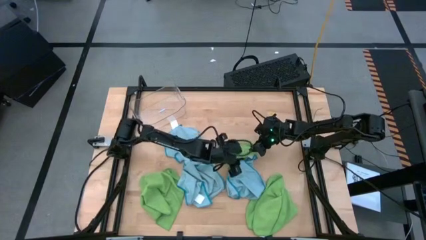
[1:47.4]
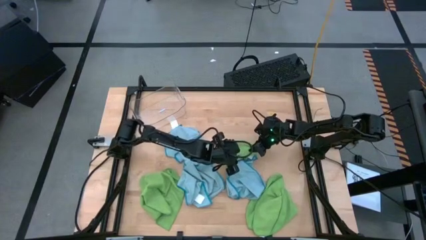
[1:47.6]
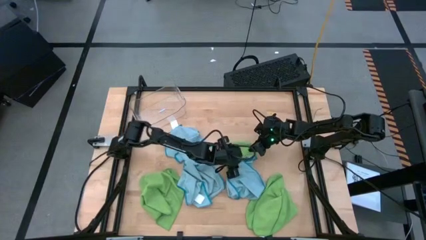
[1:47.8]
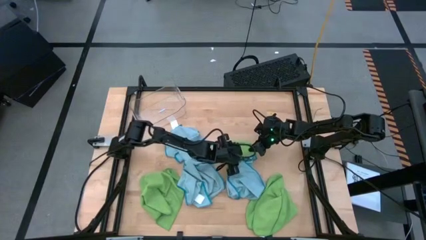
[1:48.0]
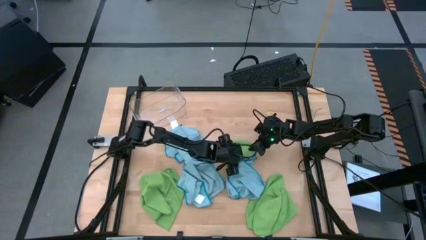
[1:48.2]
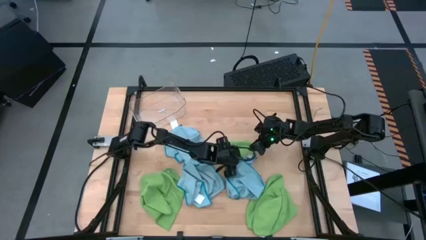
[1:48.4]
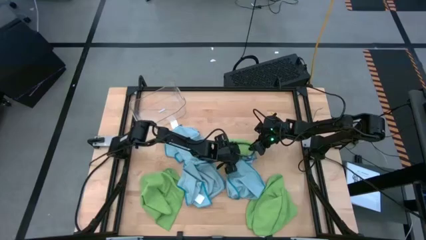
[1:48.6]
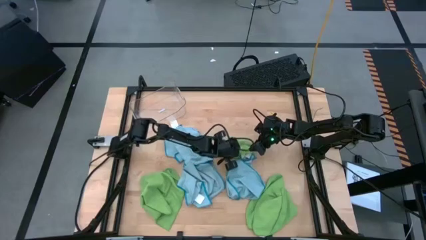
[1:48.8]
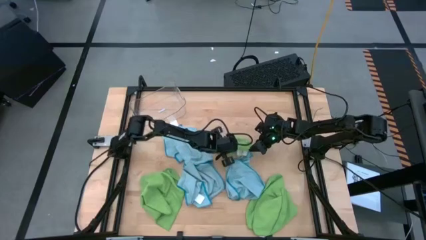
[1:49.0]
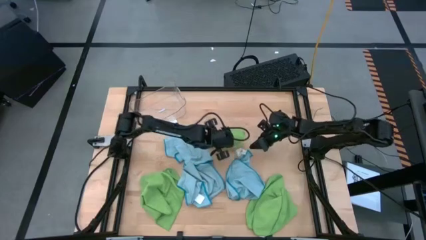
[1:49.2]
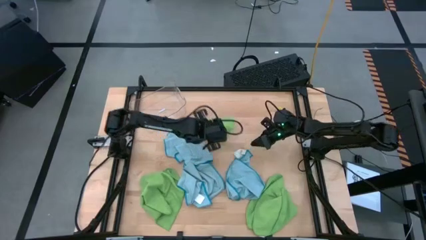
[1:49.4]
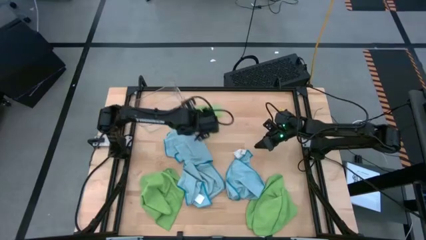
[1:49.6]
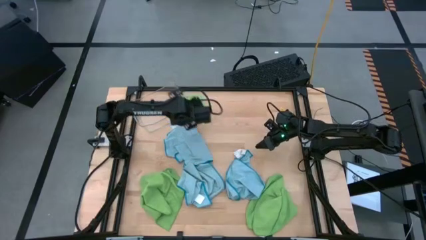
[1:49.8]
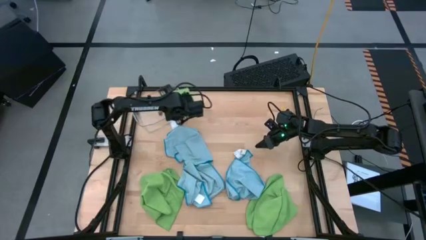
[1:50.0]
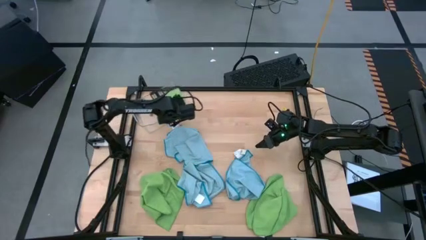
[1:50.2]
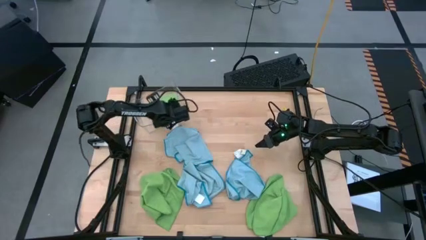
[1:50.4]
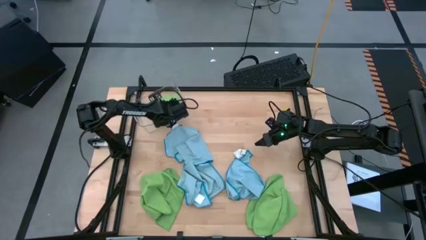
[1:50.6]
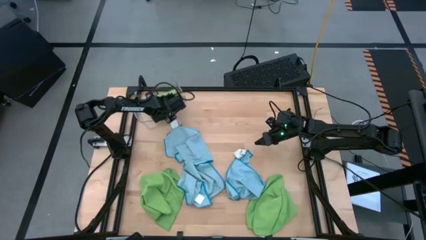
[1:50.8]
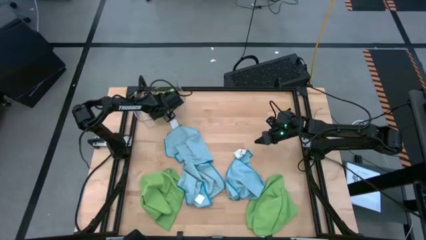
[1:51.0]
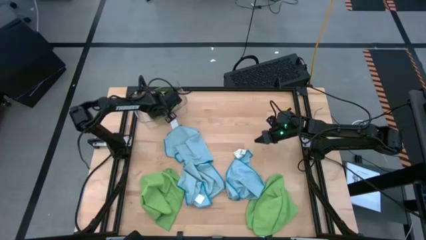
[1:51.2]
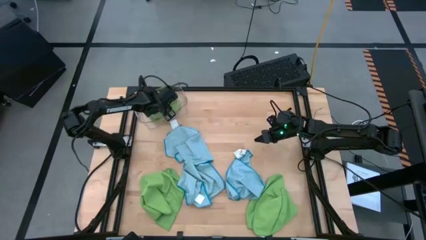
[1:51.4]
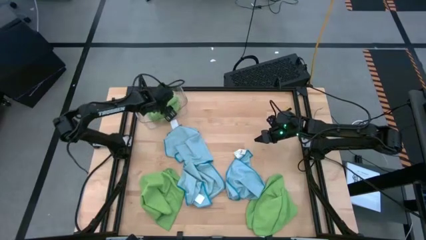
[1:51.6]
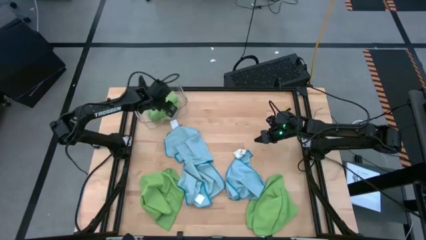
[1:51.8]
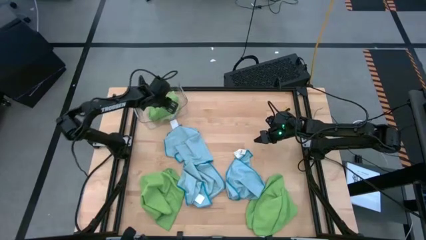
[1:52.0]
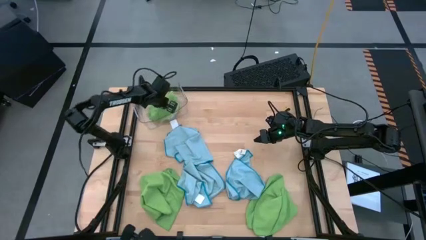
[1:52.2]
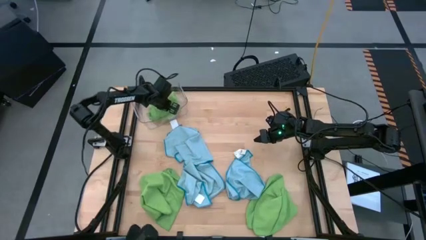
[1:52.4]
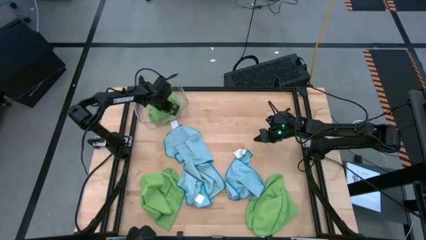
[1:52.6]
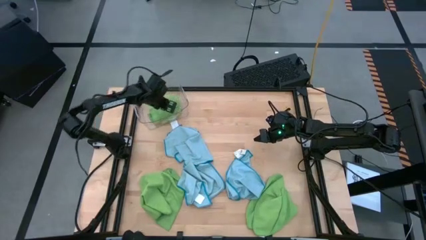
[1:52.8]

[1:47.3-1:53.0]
Task: Fold microfiber towels
Put the folded green microfiber cloth into the transparent bin

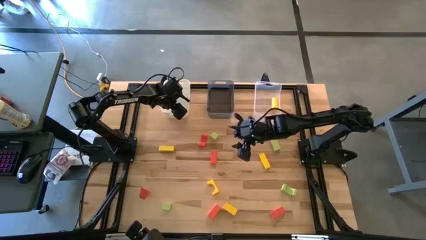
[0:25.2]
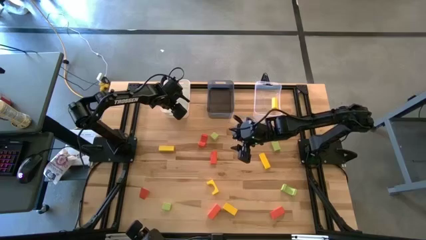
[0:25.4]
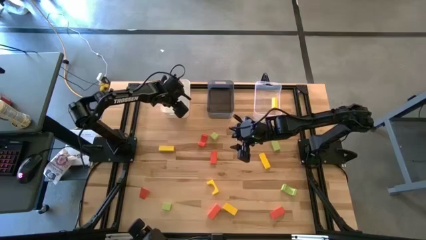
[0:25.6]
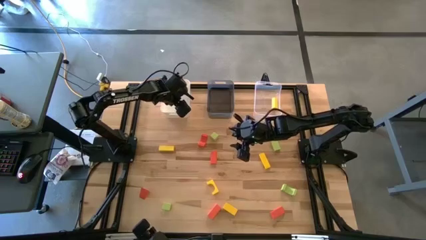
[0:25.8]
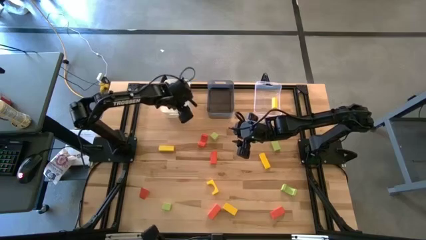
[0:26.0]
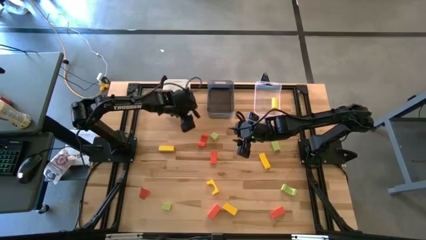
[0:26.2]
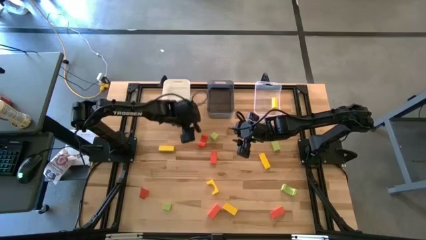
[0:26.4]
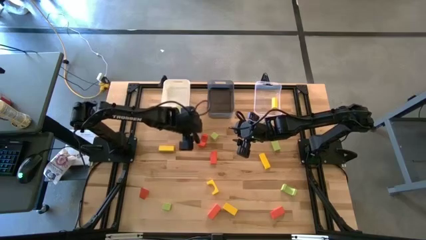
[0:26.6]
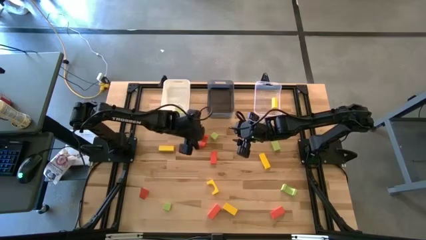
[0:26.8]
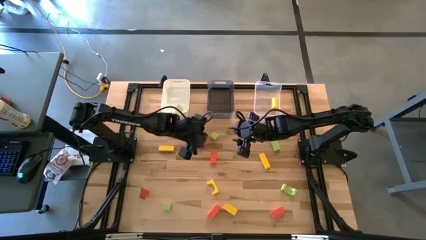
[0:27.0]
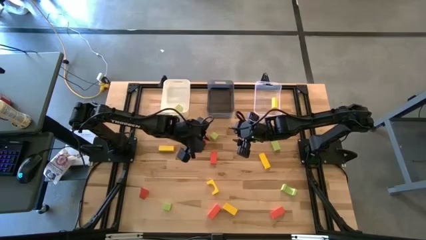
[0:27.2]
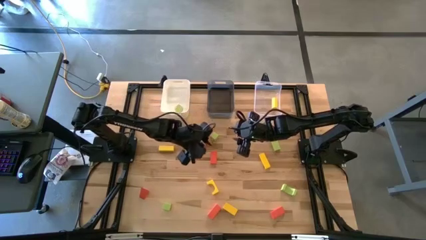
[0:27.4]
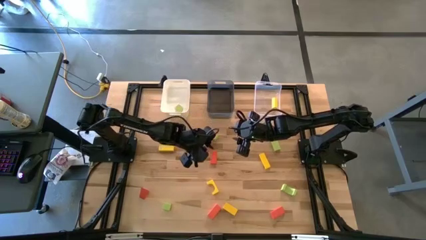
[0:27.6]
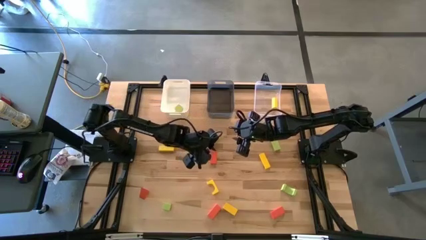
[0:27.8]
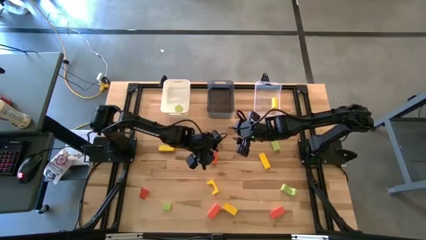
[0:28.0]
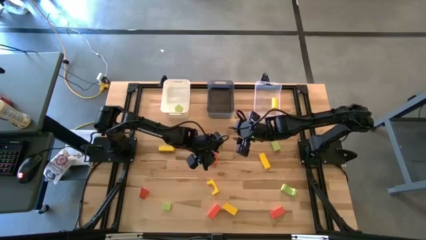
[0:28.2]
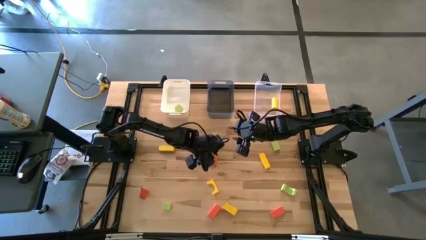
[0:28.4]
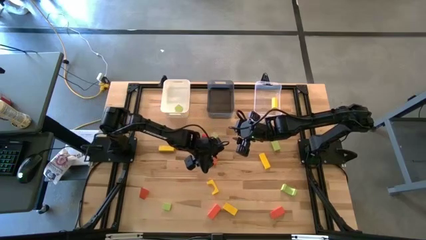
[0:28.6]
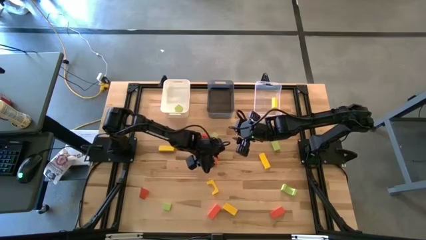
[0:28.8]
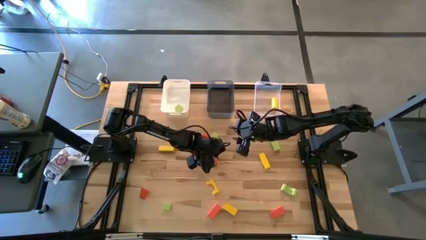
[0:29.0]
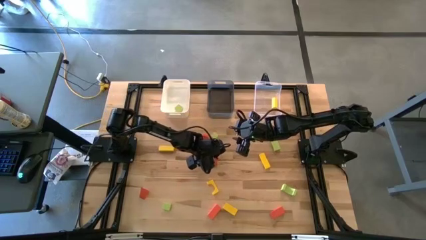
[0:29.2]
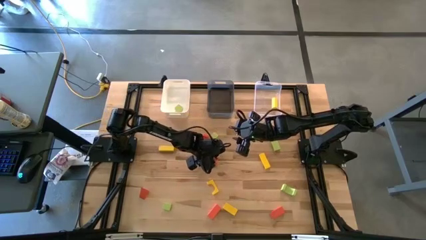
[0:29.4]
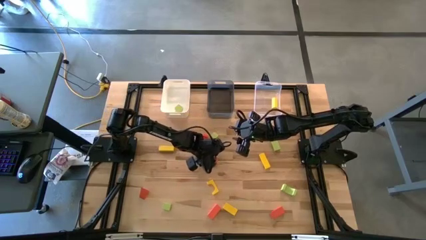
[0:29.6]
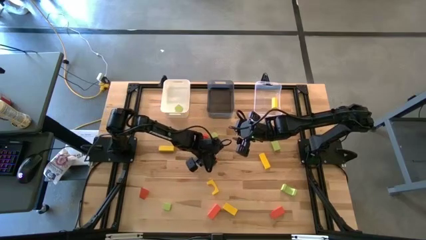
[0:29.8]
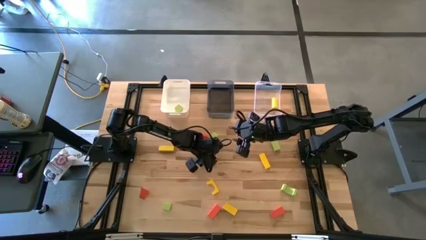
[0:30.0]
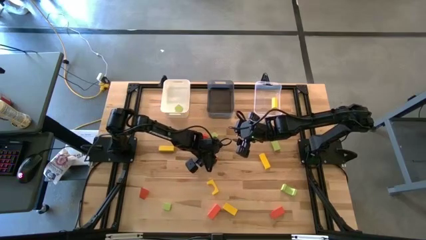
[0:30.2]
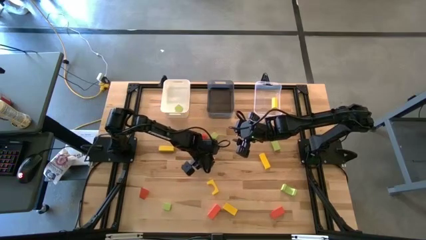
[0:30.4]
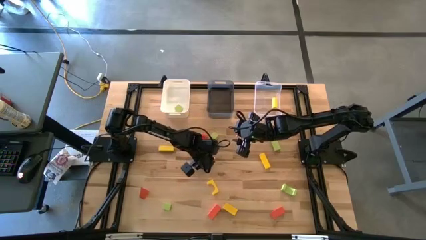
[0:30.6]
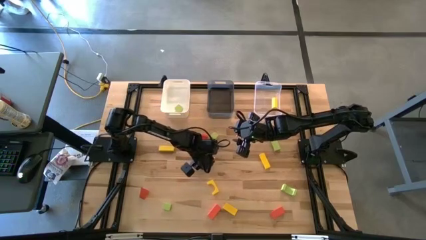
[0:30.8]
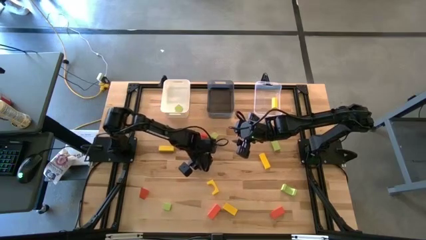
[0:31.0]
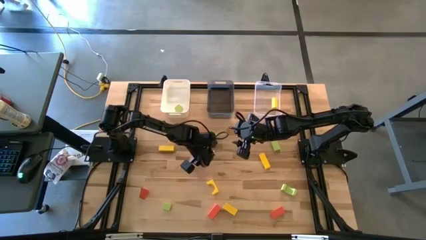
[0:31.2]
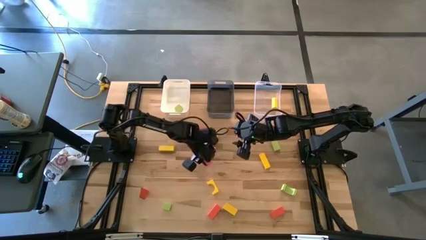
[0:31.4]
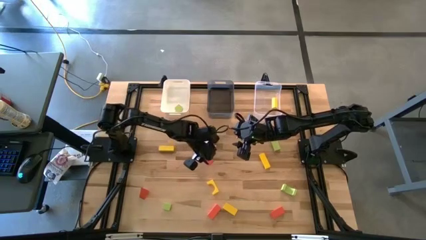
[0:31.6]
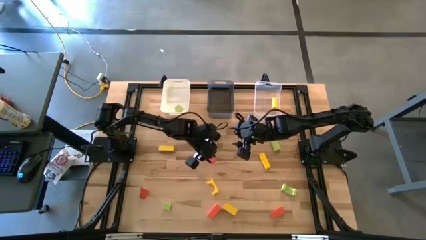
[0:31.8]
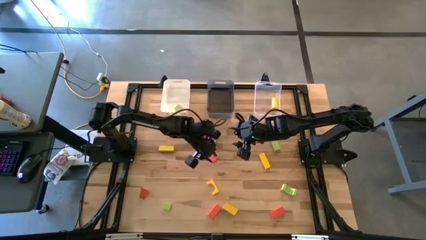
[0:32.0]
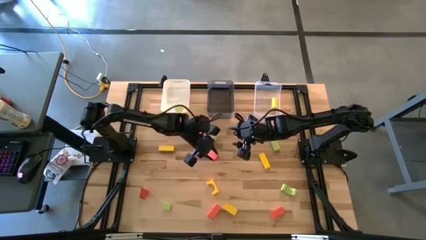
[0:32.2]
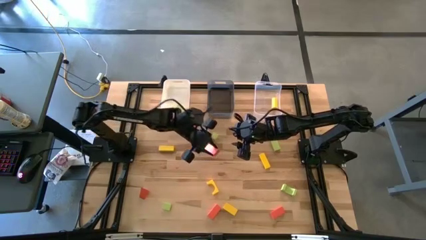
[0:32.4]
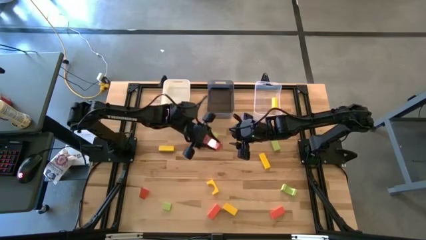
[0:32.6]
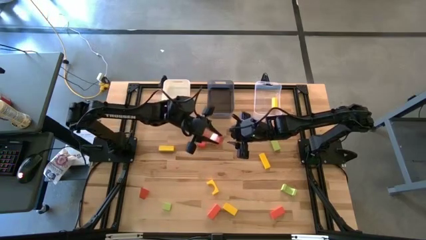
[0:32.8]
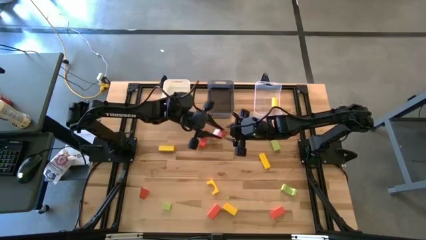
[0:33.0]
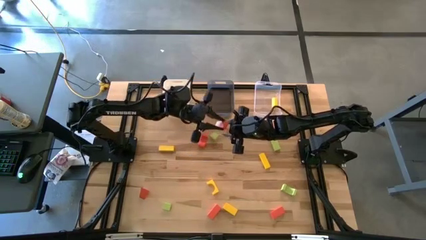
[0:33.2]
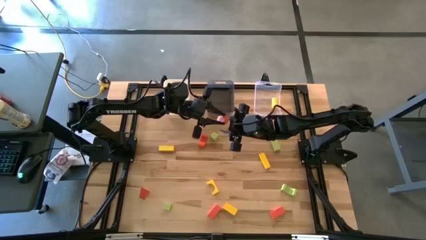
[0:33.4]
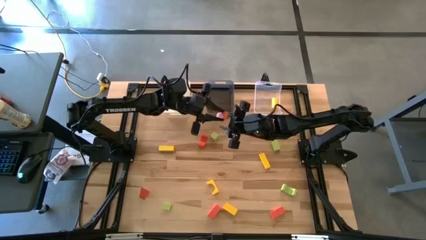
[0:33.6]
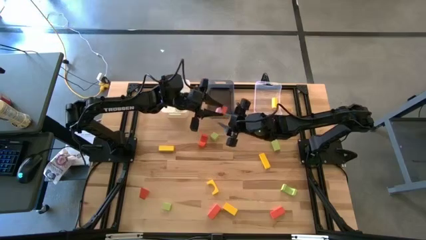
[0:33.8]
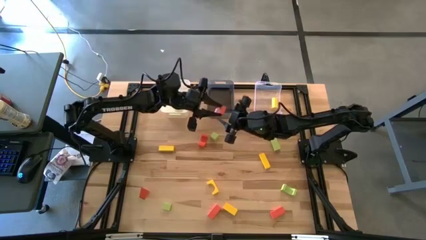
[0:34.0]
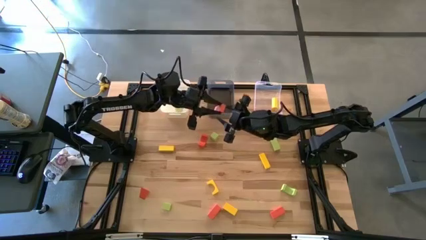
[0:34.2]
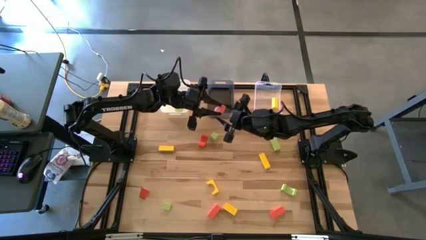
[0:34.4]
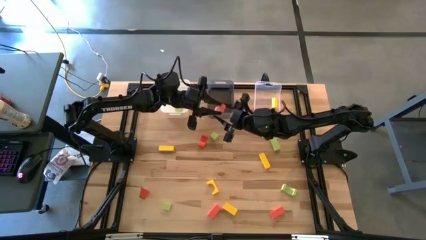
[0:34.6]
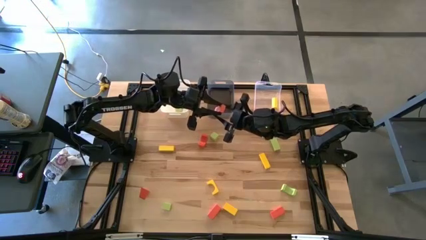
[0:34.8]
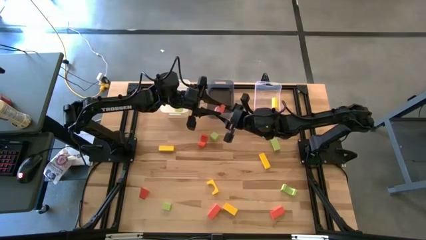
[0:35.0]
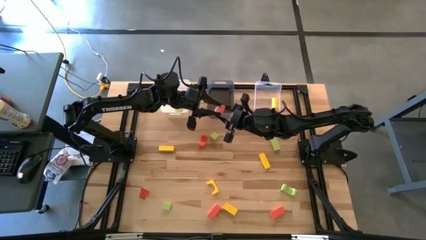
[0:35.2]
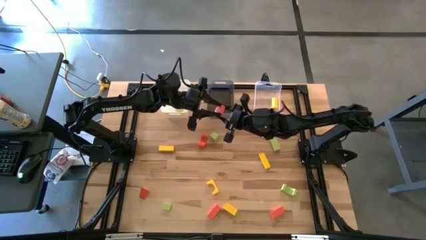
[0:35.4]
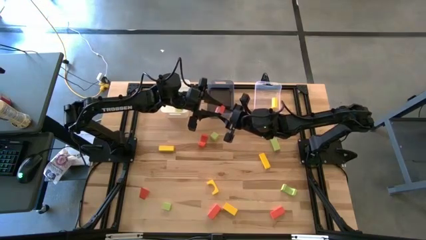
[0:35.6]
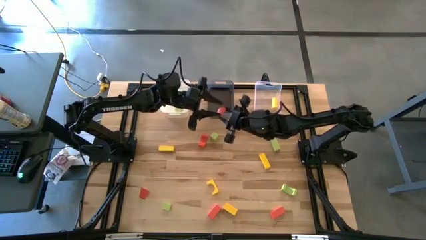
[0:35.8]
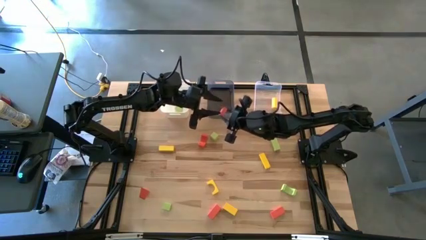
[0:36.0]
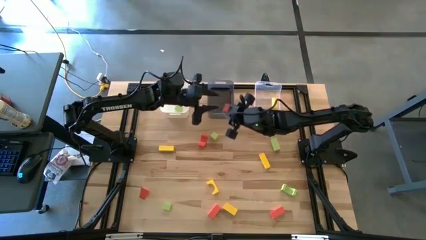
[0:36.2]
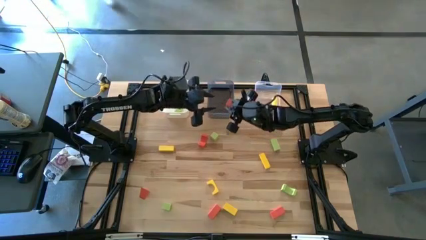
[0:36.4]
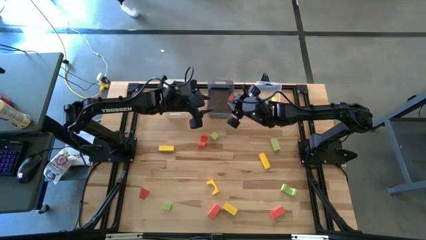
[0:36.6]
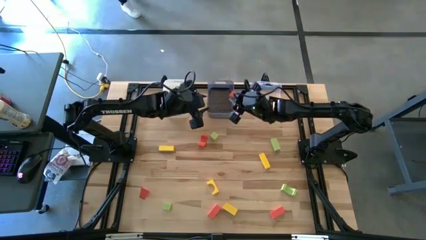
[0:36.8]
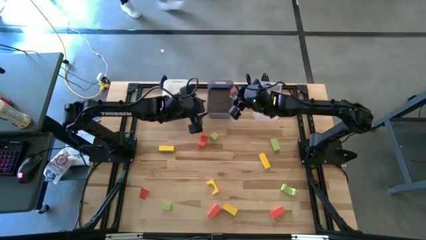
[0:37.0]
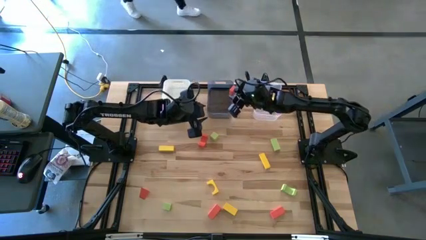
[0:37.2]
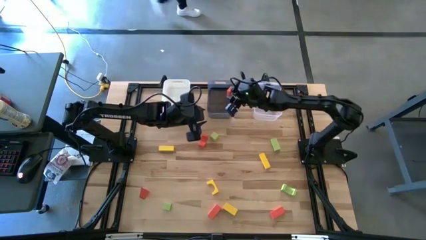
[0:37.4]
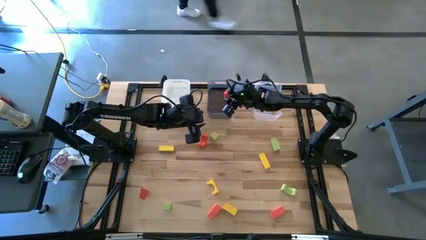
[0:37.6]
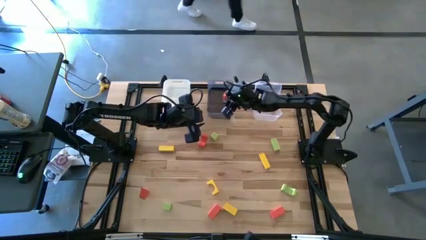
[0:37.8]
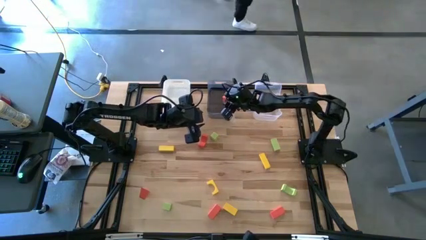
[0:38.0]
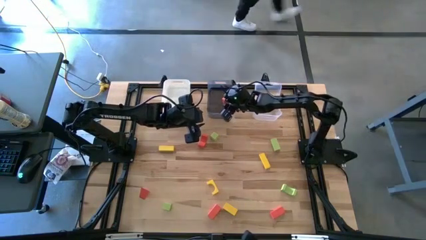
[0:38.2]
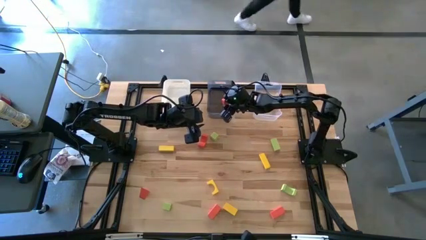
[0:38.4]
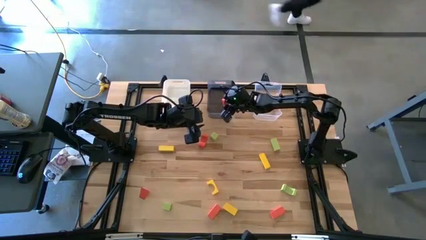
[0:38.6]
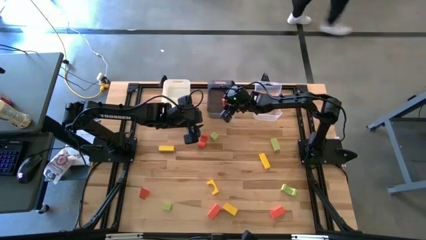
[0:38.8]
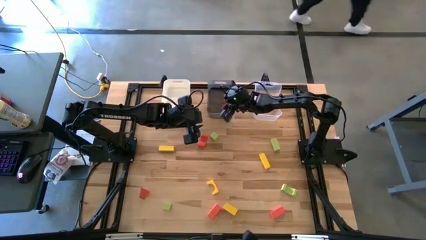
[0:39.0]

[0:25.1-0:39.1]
Task: Sort & place blocks by color
Put the orange block into the black bin
